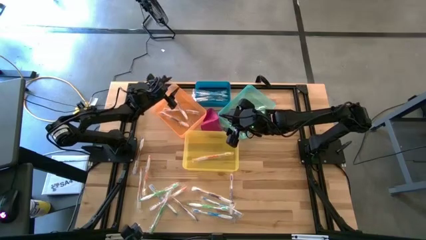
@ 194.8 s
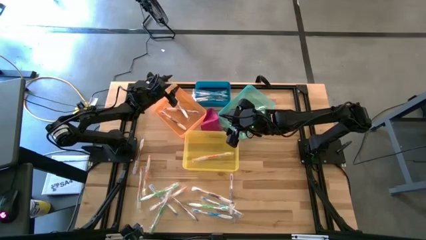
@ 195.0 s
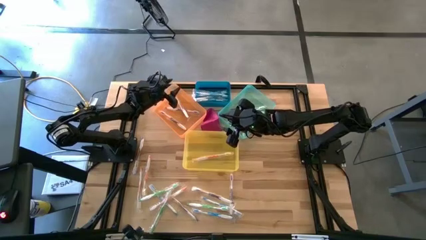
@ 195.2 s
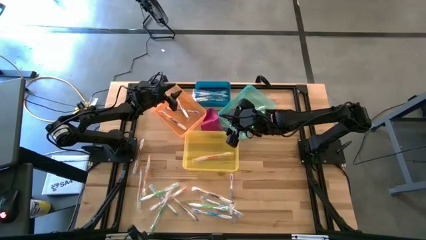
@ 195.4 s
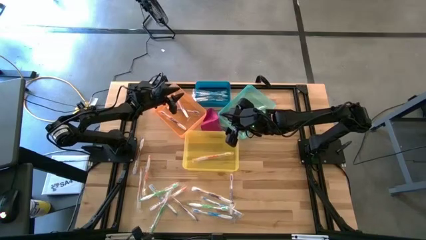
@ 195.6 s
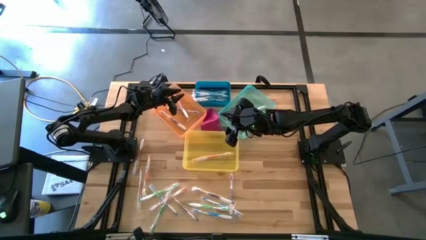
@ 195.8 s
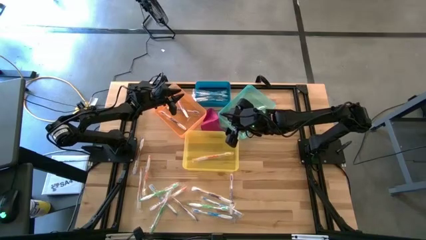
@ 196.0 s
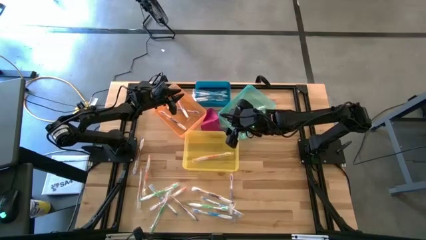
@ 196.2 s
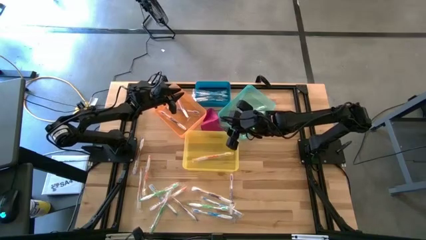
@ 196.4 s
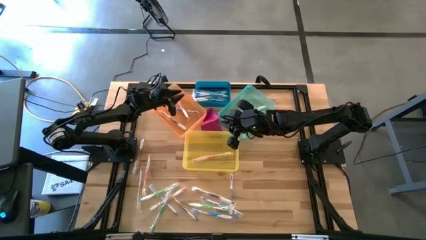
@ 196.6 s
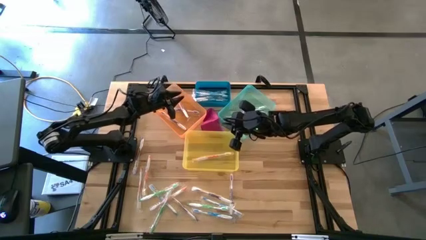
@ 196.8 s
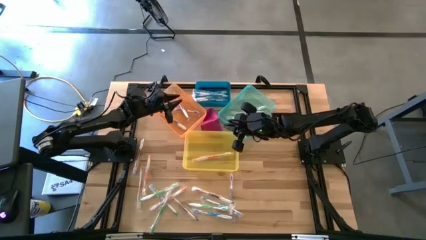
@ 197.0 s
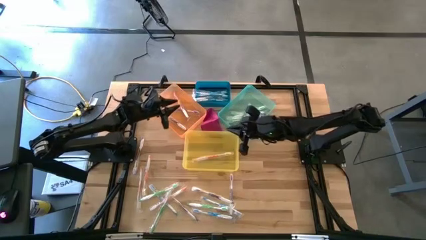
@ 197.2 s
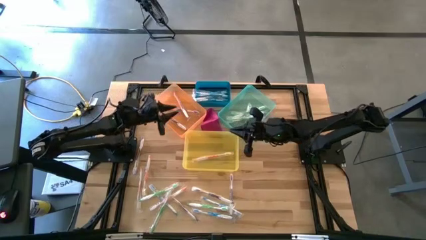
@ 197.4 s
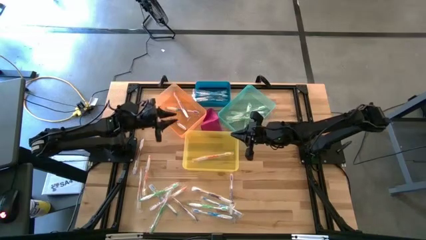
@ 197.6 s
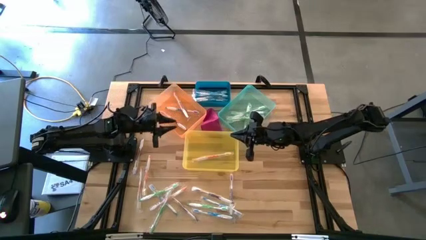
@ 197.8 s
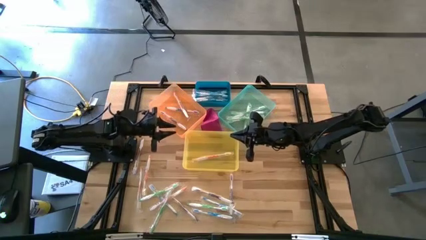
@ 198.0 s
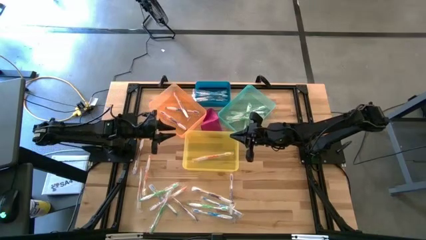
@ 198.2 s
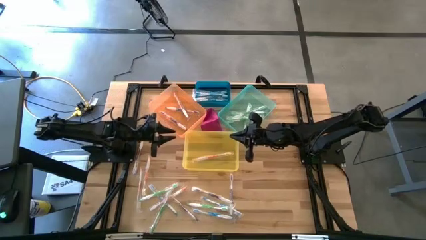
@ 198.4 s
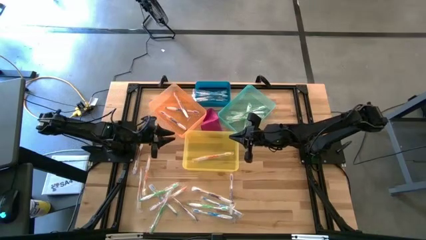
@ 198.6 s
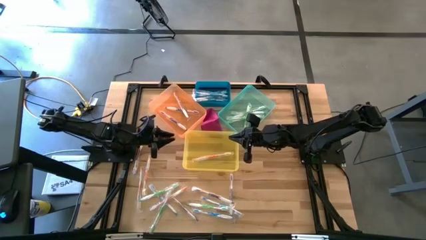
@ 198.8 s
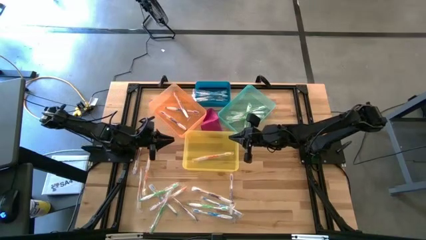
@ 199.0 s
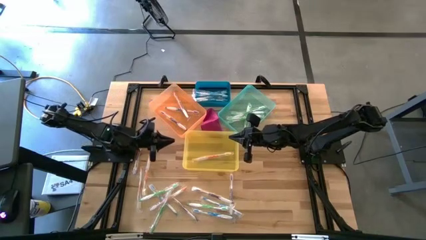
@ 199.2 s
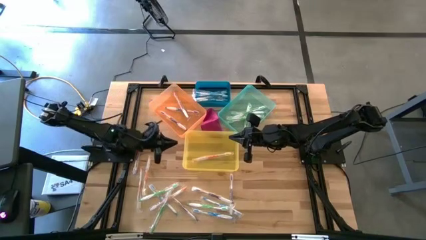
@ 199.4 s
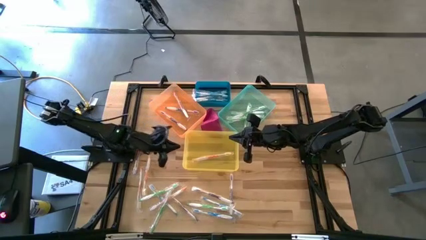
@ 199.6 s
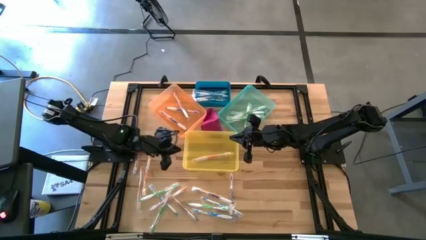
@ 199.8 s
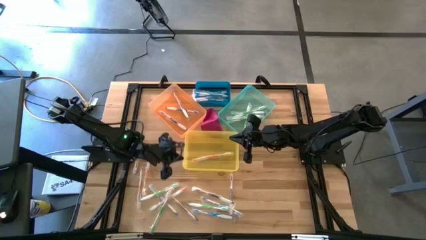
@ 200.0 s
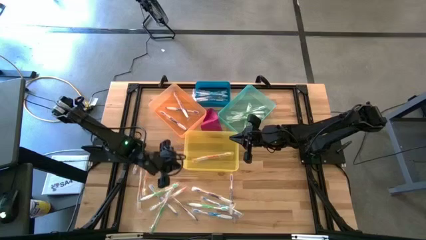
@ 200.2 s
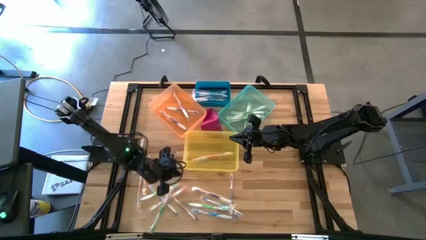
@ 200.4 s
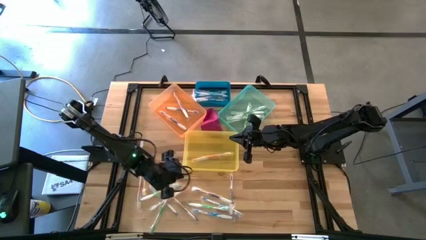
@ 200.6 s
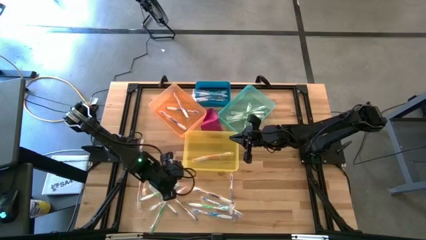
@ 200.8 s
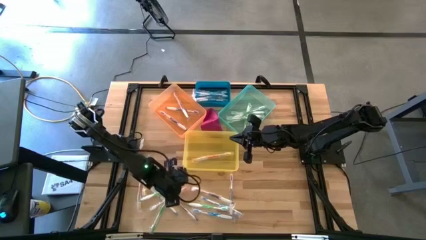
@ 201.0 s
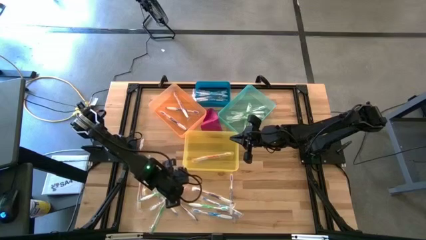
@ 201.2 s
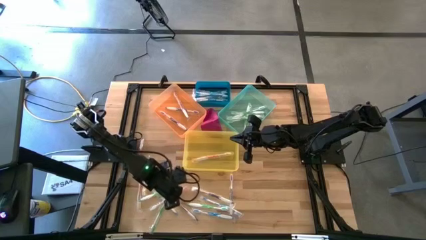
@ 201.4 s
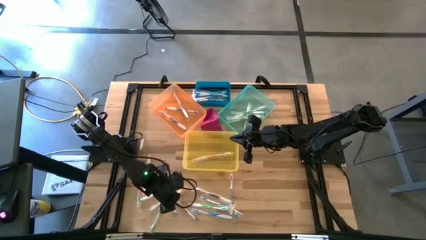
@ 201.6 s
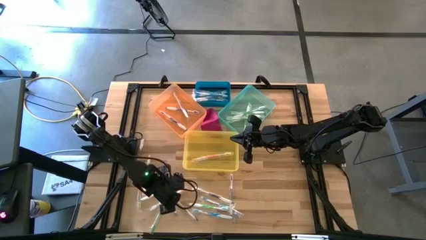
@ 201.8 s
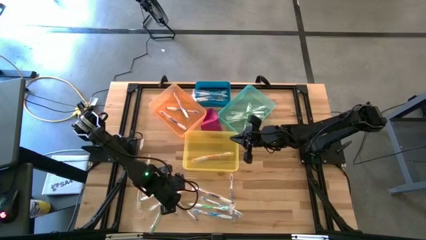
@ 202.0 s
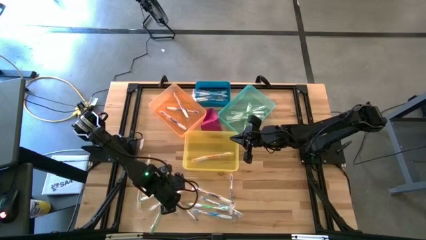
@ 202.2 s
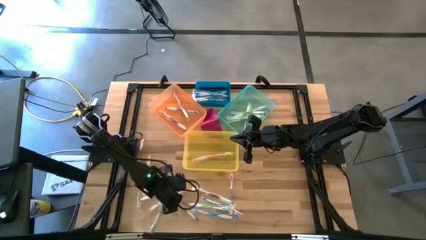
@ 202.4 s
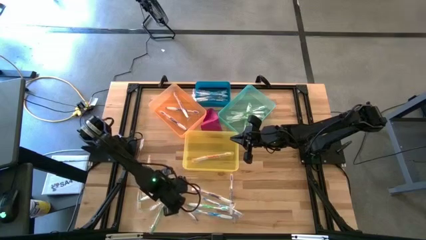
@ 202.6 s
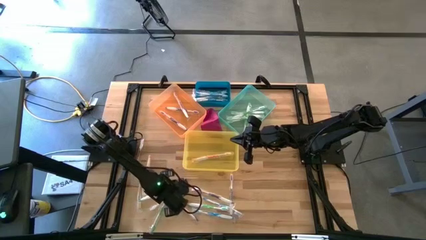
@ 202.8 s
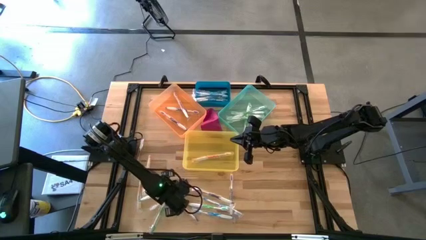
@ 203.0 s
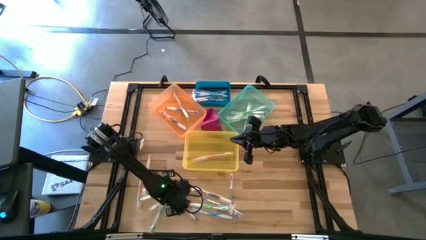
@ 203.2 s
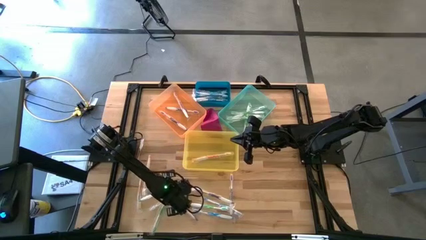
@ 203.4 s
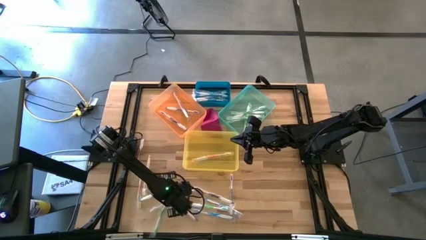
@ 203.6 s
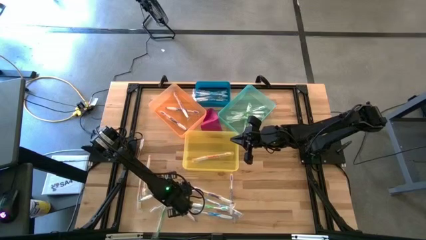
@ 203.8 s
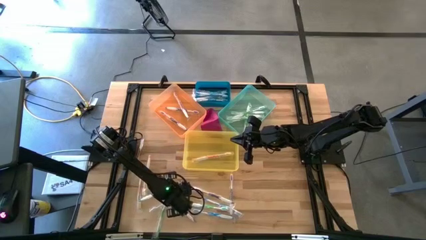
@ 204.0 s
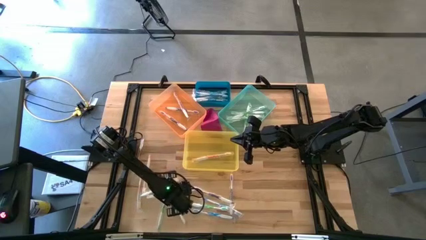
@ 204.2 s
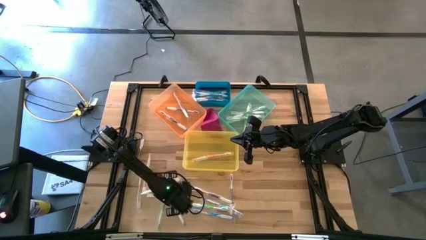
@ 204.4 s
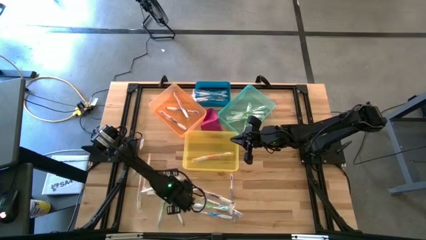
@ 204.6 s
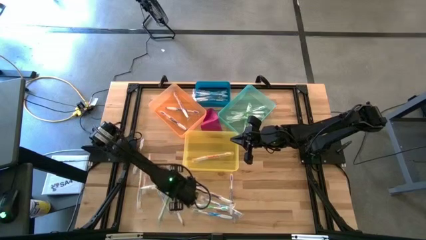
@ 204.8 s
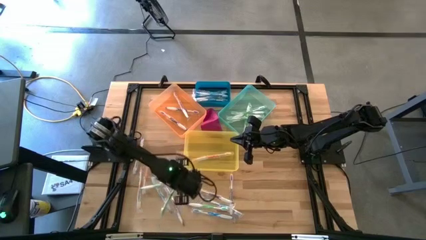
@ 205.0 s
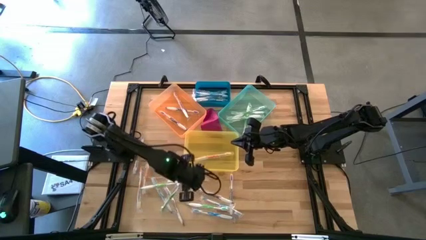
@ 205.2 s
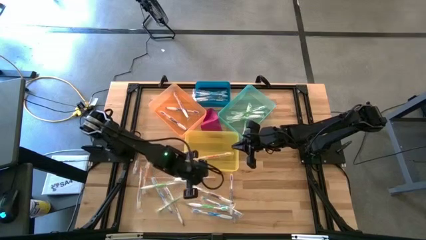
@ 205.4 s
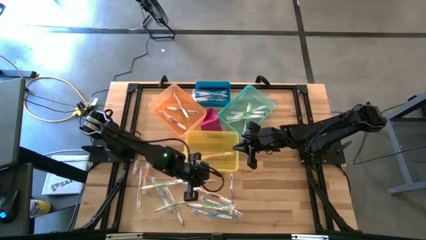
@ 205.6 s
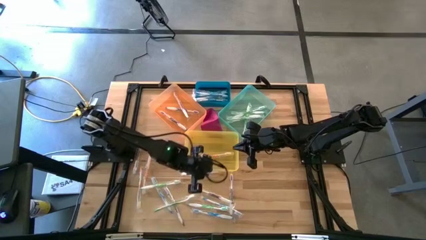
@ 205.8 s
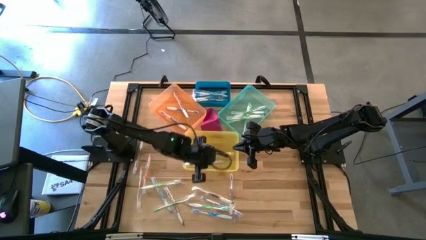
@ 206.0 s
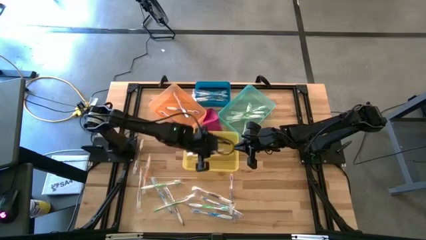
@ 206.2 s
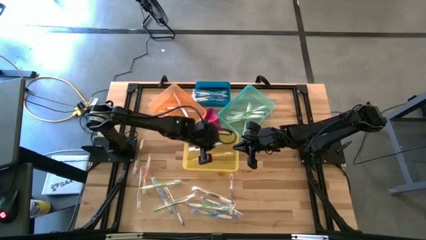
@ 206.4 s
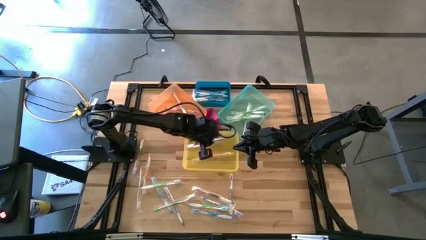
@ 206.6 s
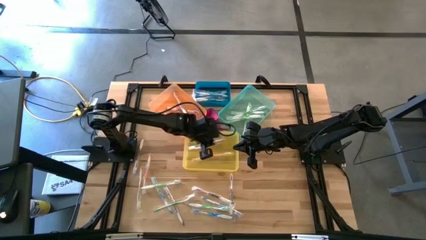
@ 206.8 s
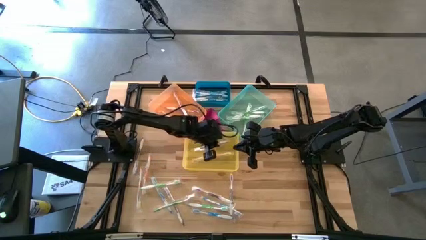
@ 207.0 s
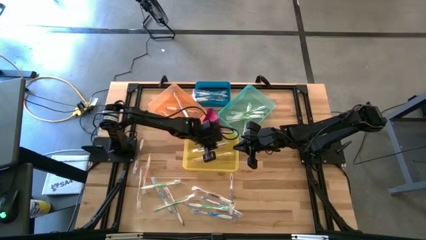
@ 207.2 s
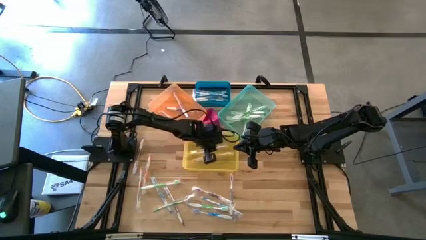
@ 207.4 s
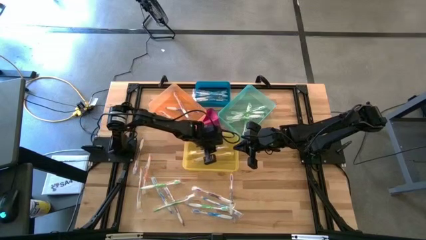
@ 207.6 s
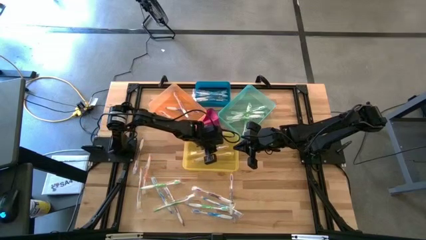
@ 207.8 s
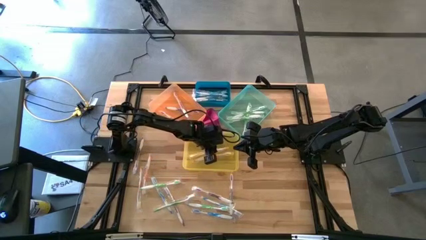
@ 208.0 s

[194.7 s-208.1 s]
Task: Pick & Place Toothbrushes
Put the orange toothbrush into the yellow bin
